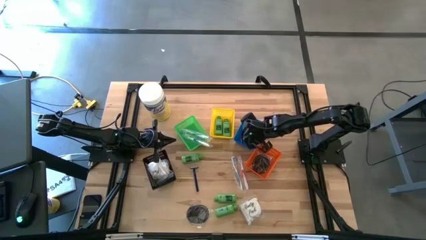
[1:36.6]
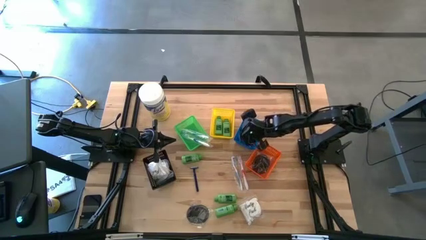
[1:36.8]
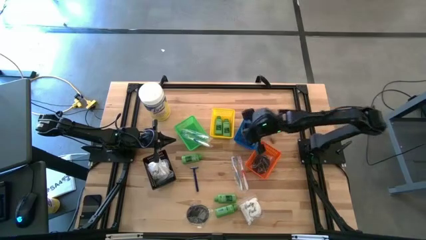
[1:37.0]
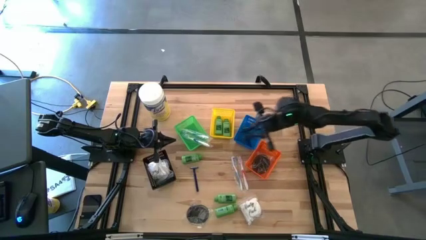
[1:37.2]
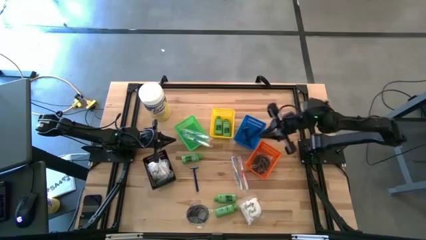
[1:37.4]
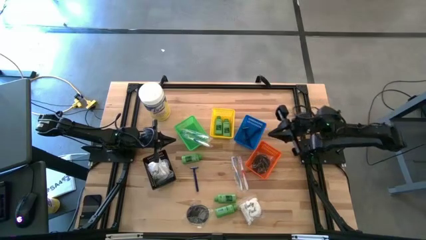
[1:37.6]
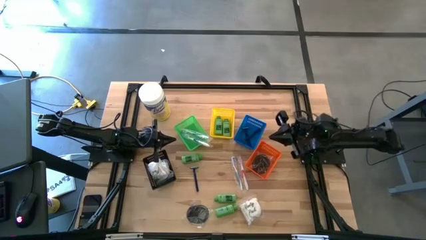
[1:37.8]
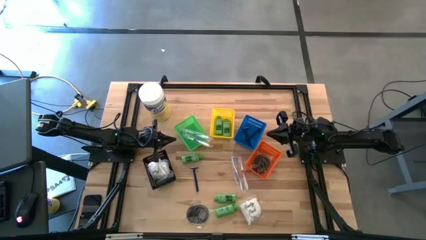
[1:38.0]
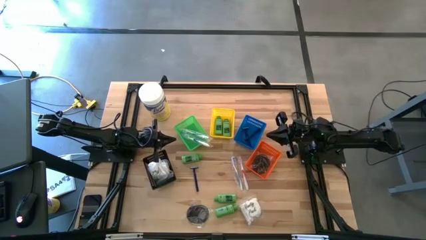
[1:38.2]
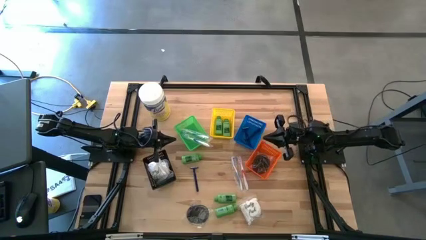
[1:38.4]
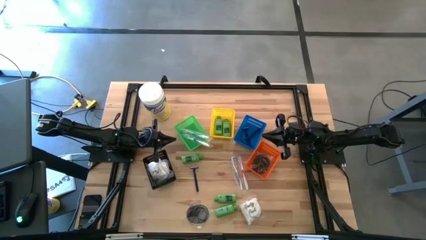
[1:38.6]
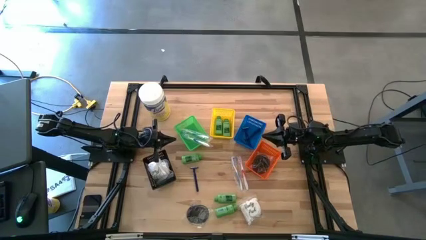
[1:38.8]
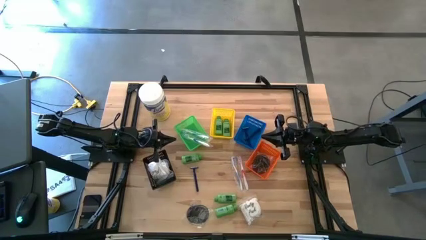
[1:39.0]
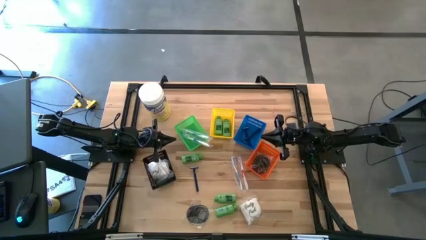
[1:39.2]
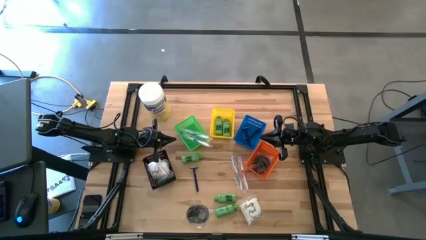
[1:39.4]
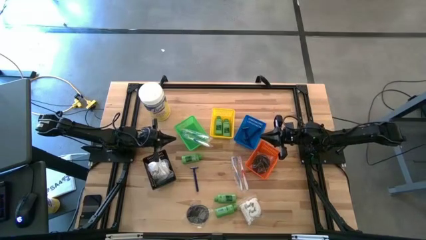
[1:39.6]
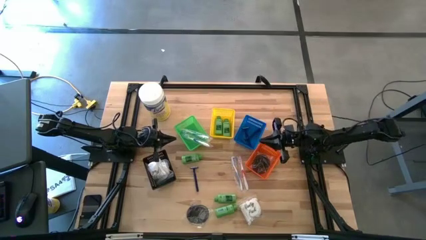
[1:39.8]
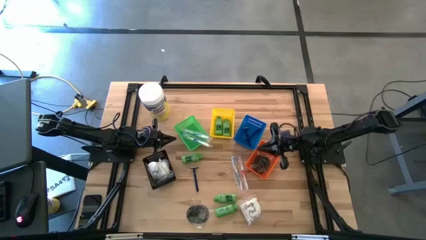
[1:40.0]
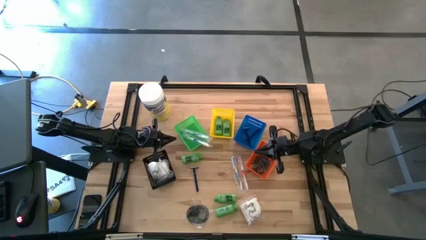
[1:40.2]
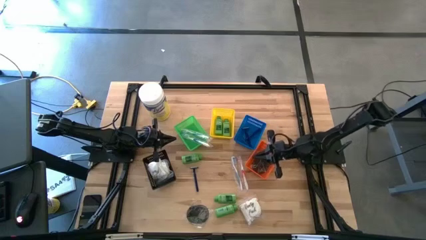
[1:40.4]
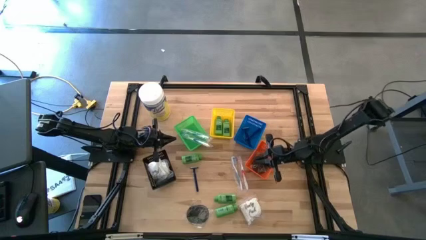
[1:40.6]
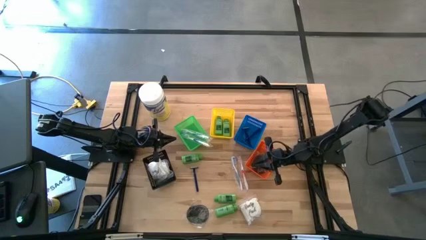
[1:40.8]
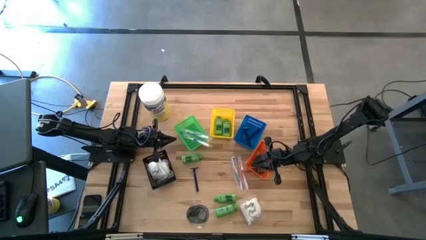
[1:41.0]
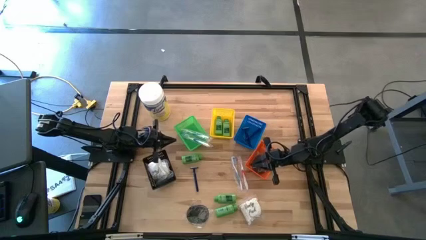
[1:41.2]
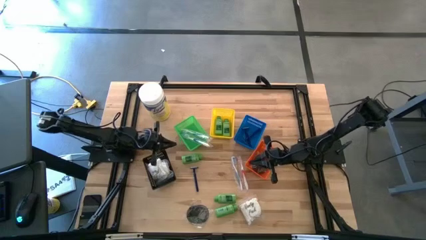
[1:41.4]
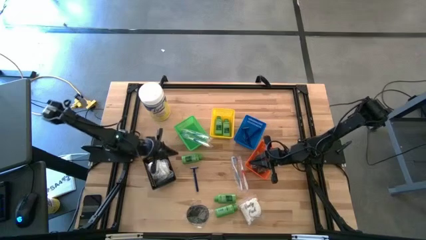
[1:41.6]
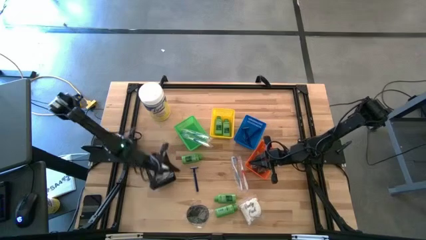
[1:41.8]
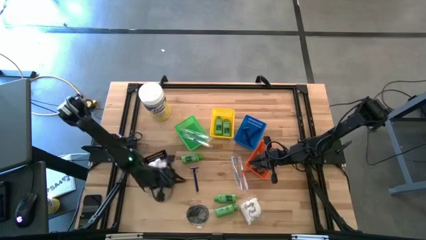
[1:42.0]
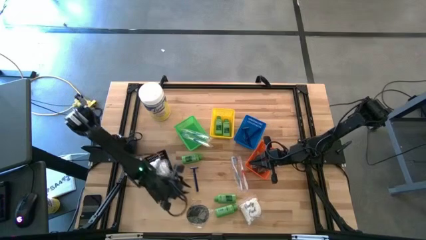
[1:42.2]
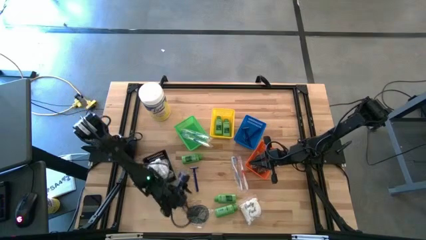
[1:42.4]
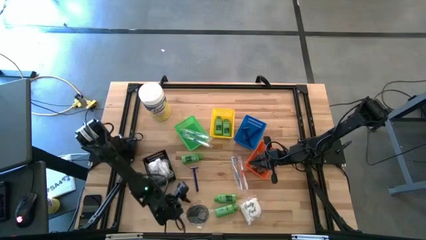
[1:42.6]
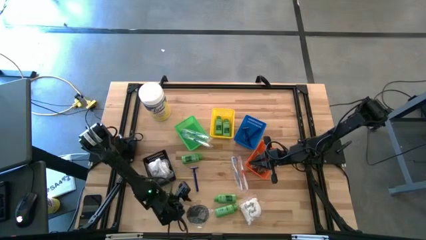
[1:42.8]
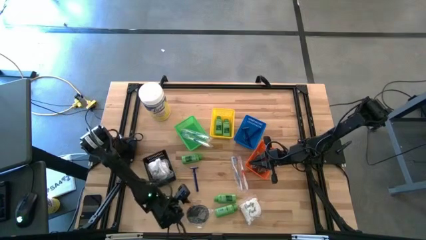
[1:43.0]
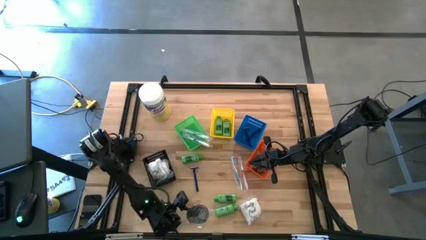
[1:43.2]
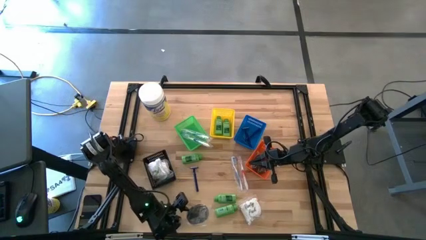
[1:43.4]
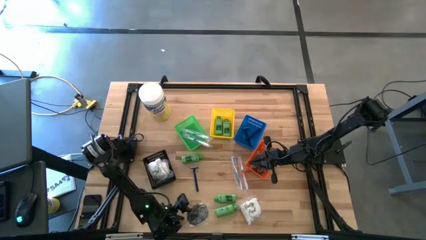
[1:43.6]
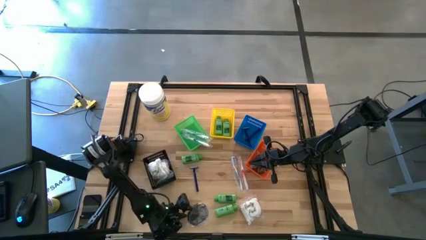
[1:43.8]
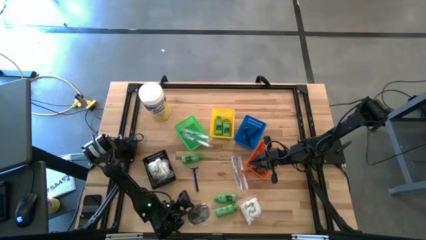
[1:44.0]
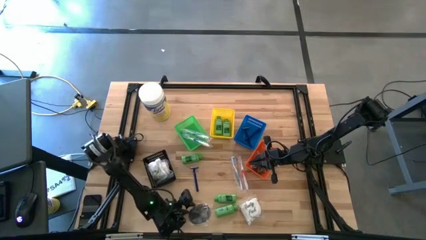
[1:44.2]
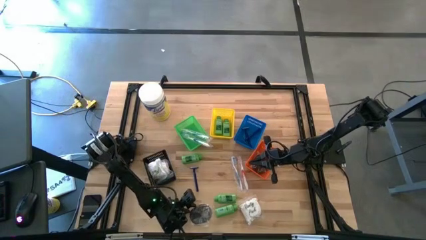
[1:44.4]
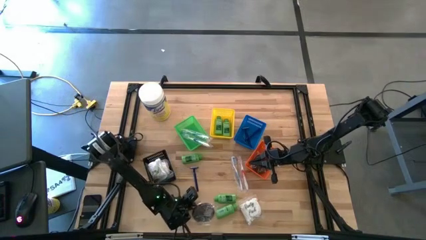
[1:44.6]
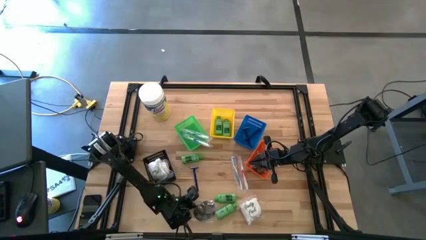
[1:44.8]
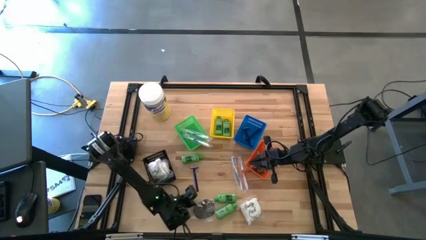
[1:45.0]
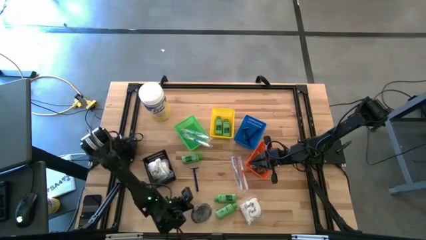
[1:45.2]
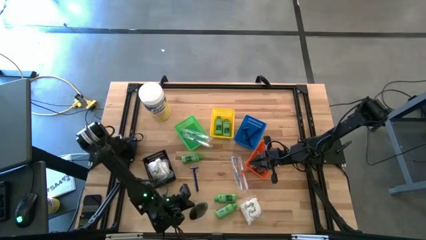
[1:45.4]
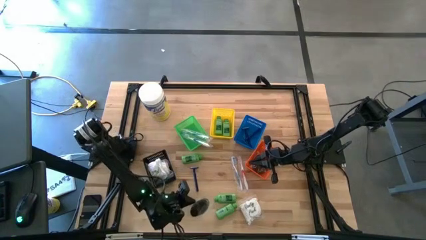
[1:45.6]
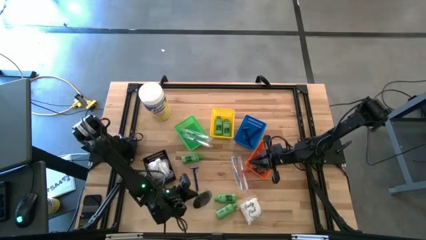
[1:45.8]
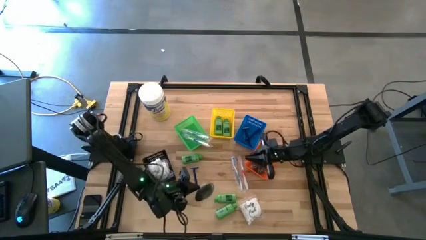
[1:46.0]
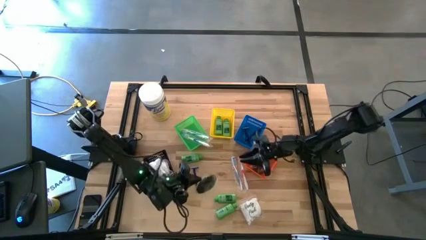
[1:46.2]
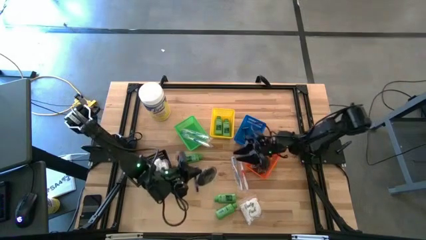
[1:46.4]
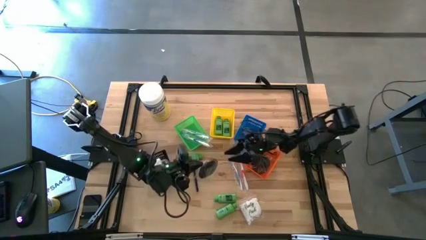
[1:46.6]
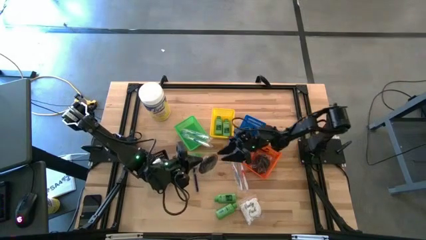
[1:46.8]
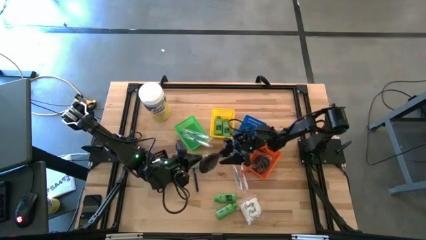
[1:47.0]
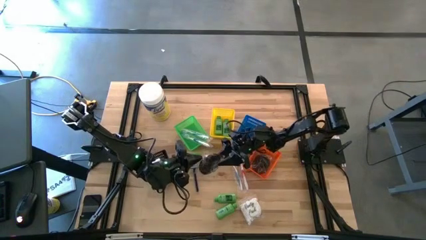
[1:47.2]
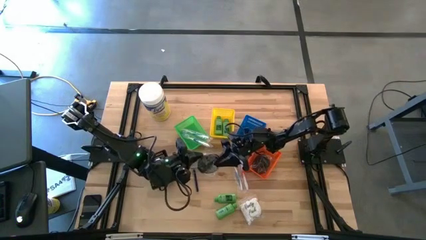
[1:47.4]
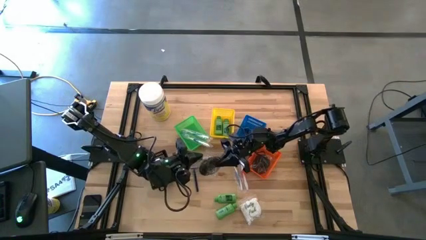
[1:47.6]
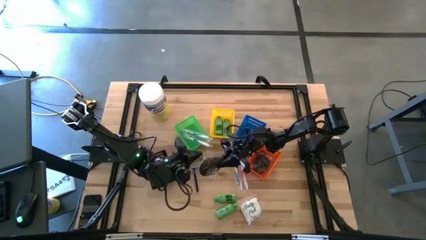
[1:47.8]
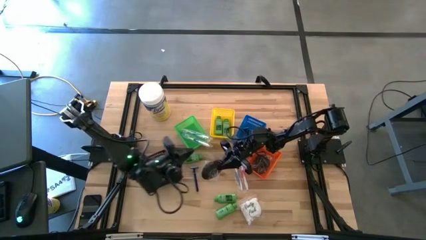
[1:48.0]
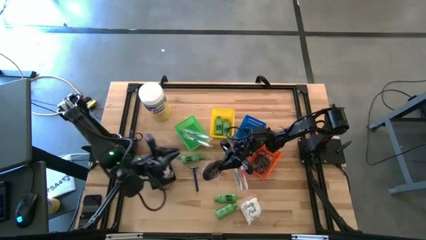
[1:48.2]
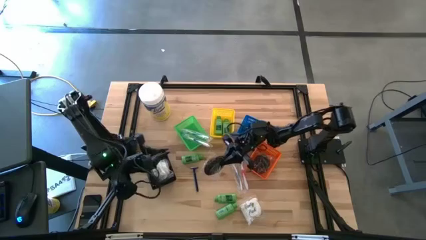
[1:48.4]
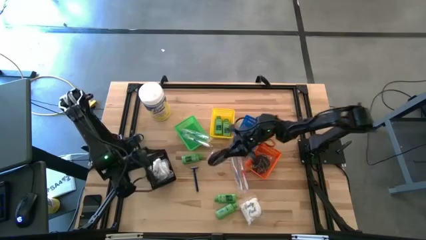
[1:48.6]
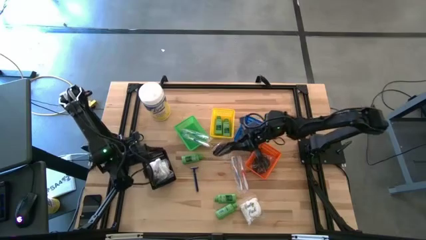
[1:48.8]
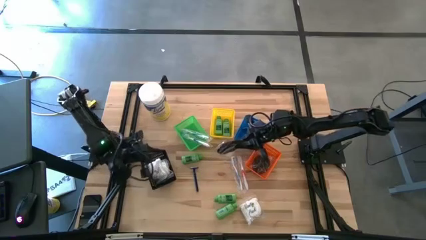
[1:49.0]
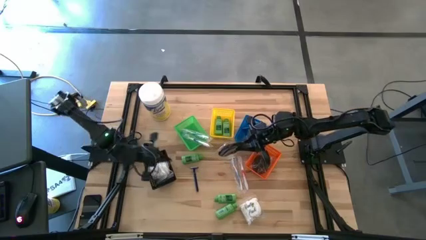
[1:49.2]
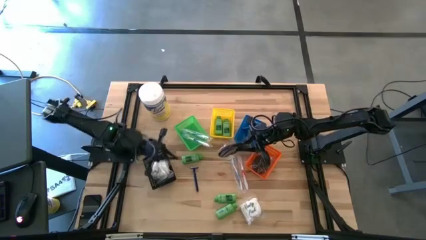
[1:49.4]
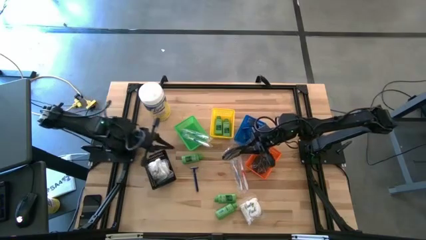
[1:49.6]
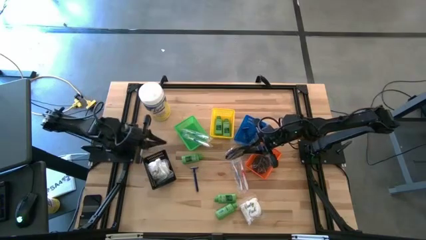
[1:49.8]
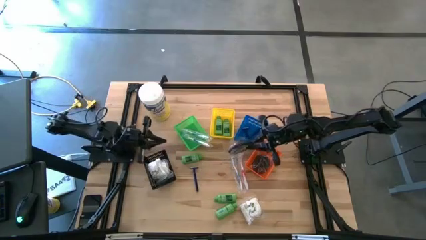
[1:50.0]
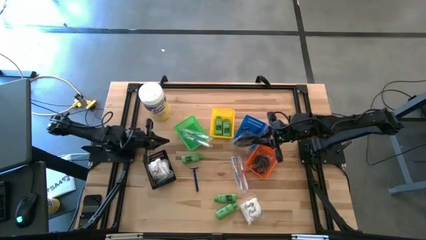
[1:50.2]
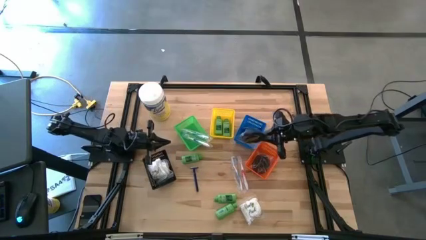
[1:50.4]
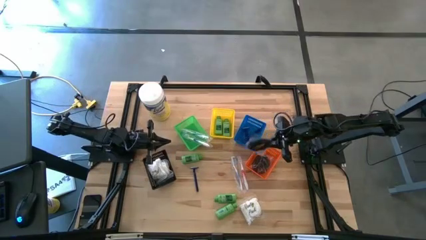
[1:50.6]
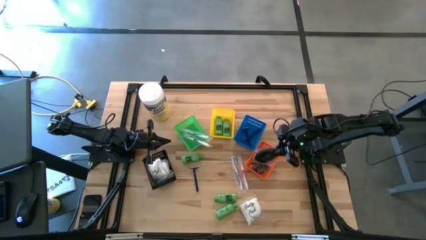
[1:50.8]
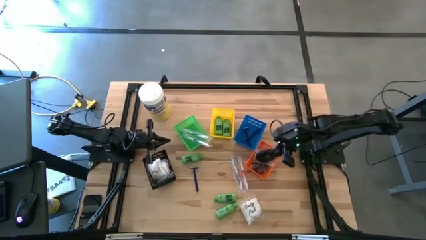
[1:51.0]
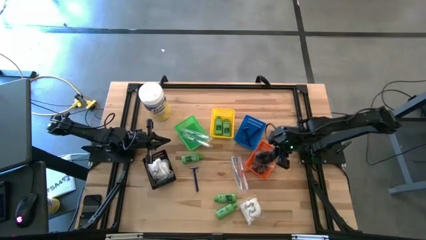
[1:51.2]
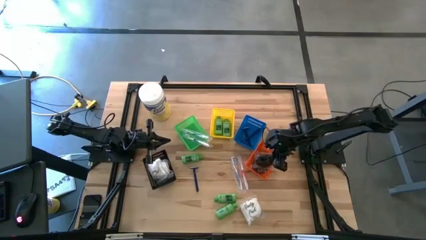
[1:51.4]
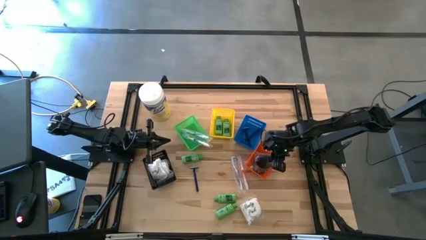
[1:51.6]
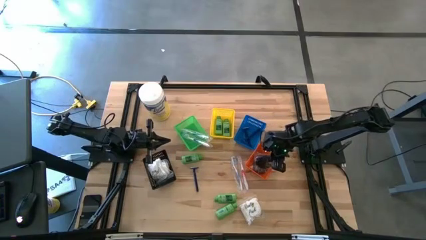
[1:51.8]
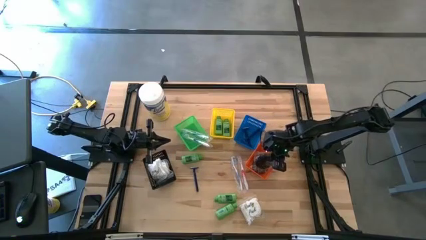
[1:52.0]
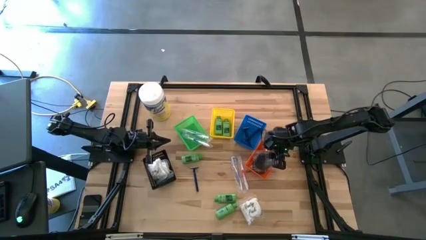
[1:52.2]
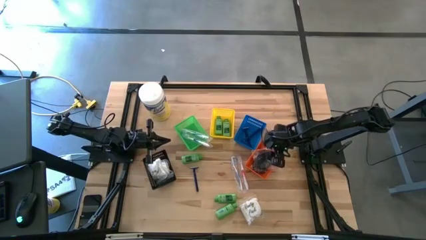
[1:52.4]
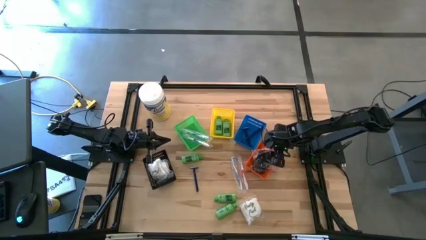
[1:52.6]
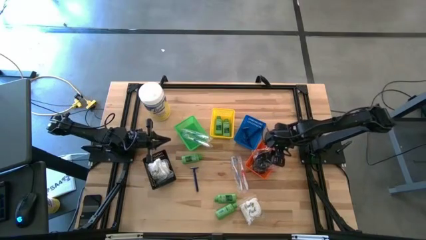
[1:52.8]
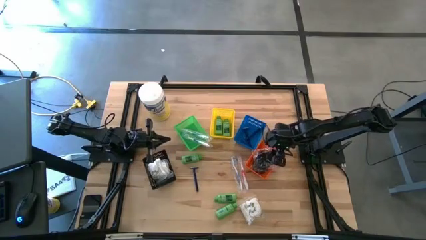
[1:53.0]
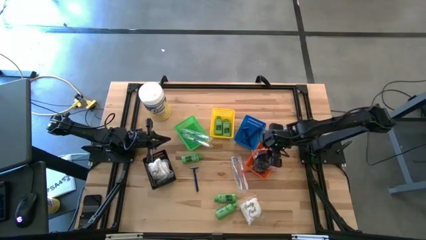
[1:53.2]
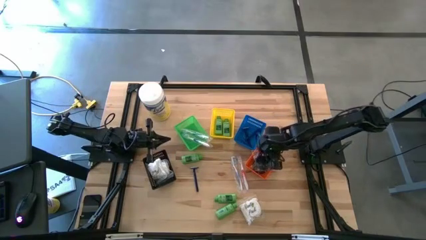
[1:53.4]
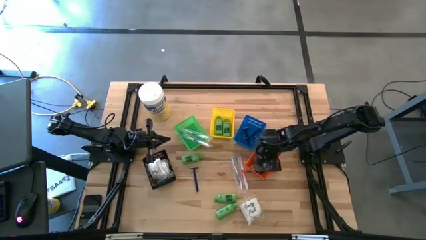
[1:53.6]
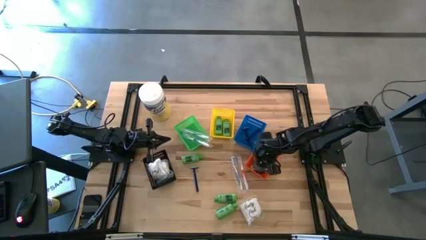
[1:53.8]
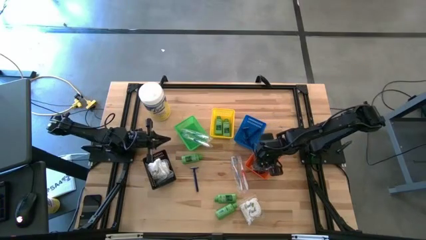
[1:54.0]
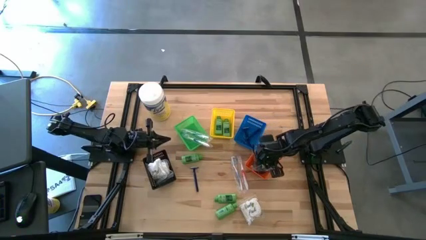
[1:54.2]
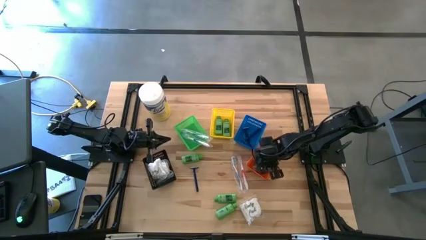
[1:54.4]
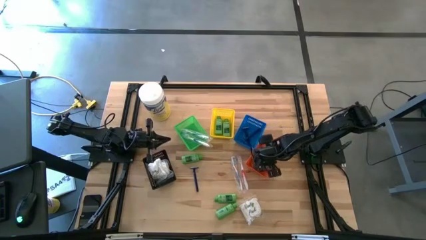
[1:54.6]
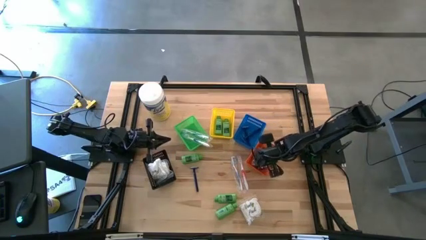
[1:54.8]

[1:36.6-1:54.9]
Task: Pick & Place Travel size toiletries
Put the hairbrush into the orange bin
